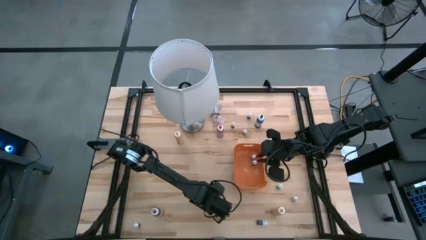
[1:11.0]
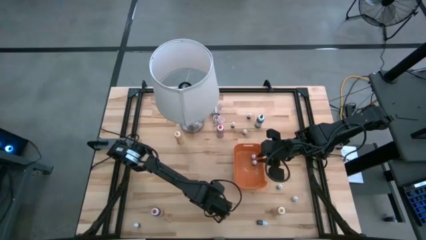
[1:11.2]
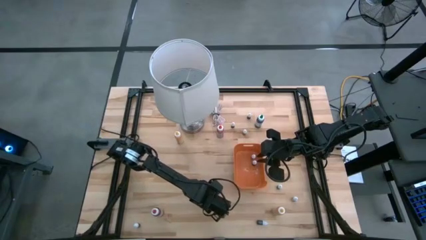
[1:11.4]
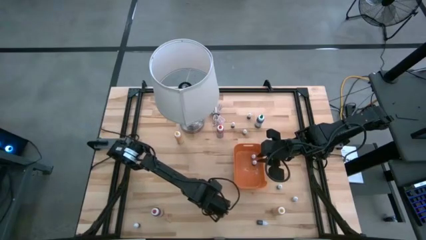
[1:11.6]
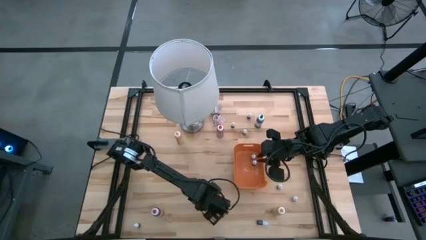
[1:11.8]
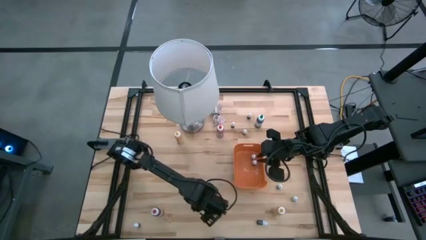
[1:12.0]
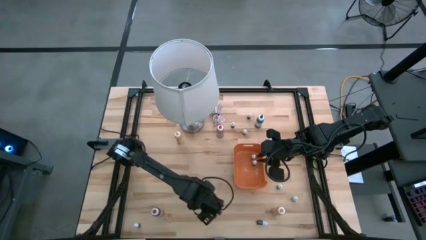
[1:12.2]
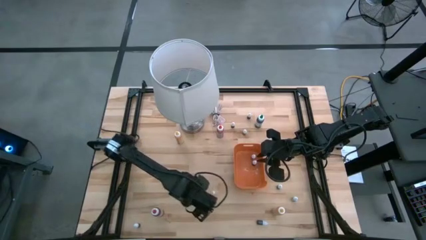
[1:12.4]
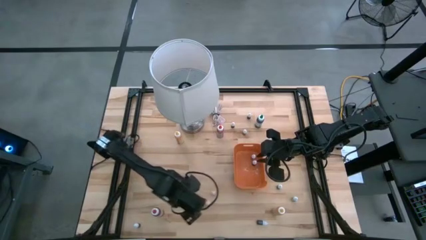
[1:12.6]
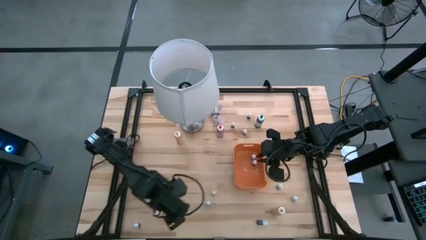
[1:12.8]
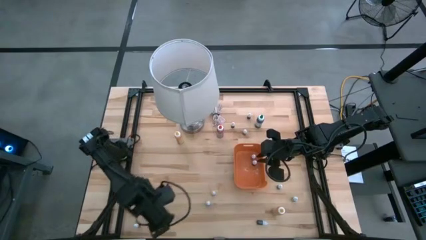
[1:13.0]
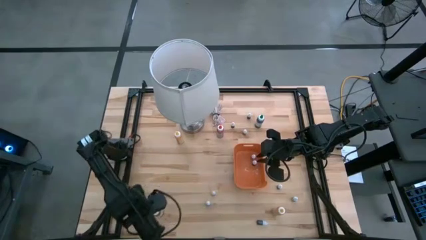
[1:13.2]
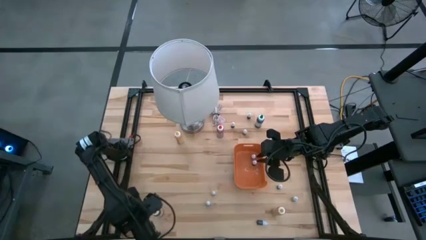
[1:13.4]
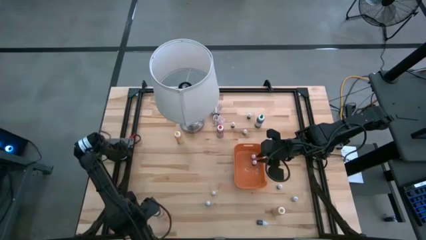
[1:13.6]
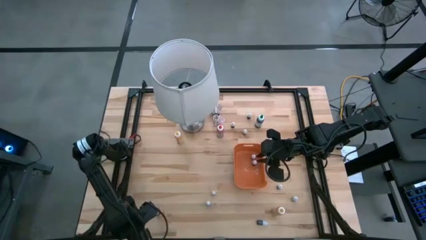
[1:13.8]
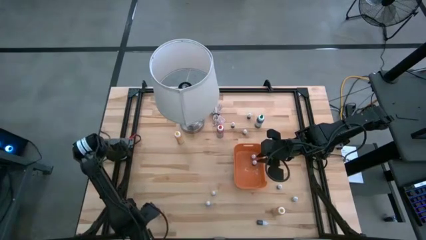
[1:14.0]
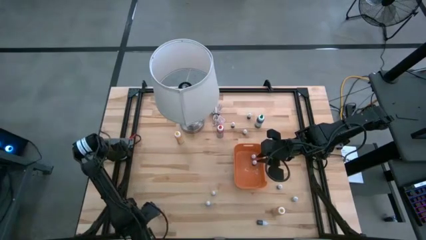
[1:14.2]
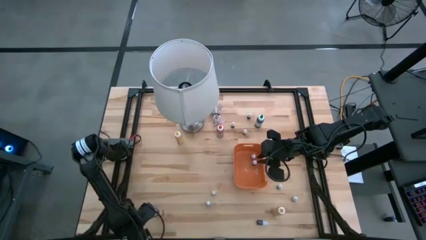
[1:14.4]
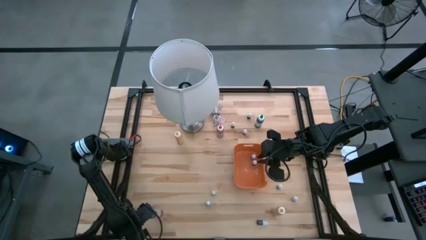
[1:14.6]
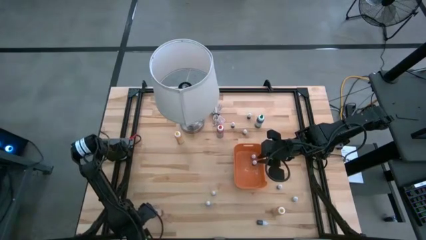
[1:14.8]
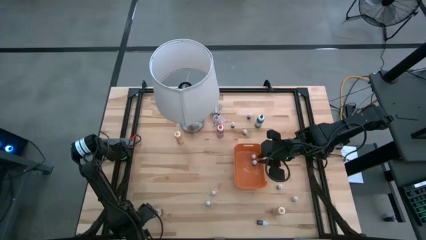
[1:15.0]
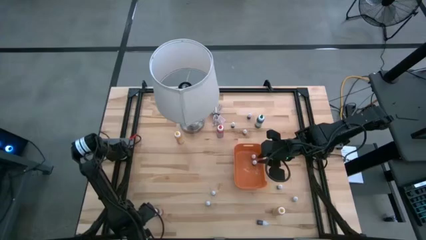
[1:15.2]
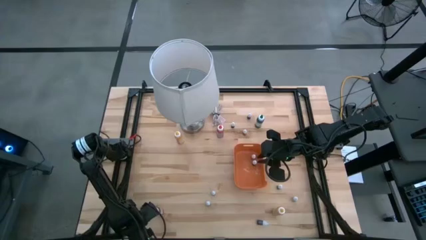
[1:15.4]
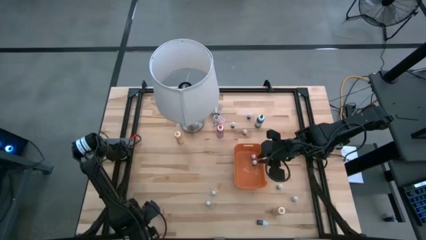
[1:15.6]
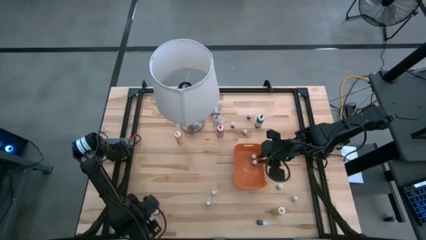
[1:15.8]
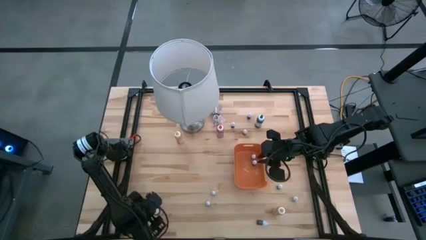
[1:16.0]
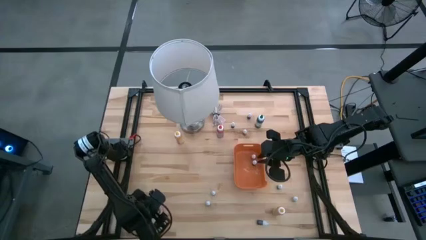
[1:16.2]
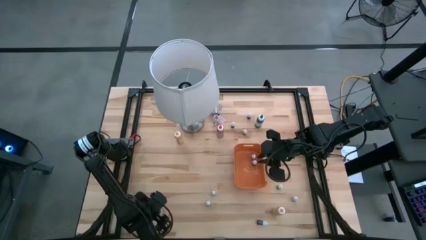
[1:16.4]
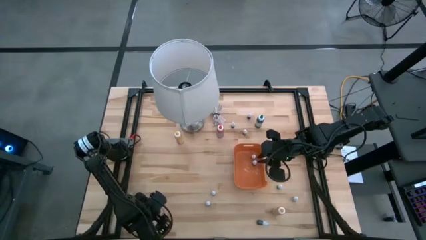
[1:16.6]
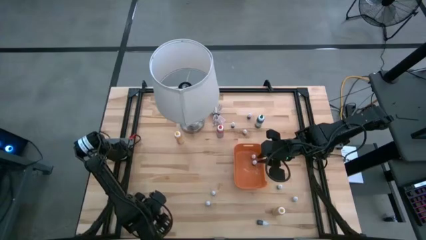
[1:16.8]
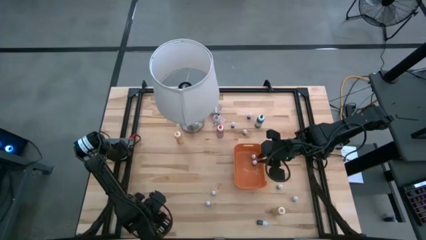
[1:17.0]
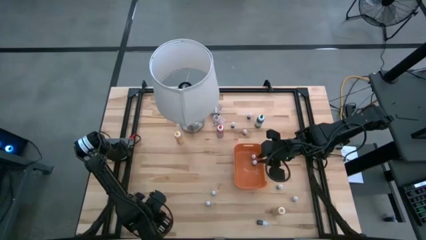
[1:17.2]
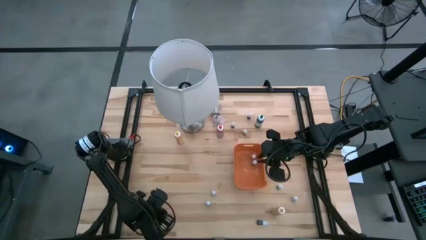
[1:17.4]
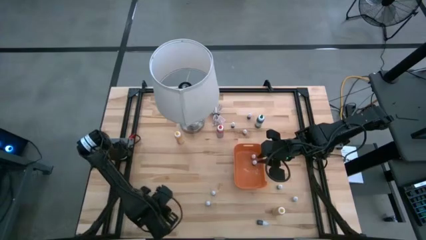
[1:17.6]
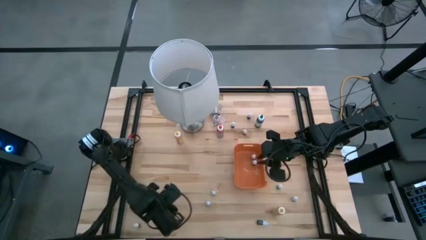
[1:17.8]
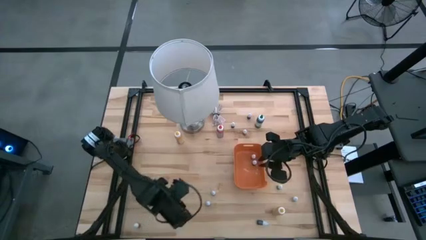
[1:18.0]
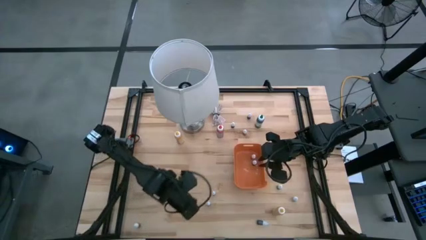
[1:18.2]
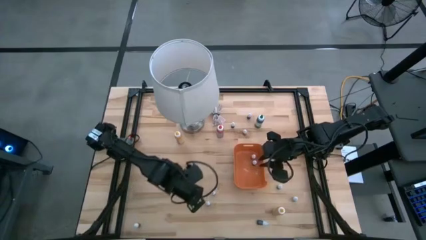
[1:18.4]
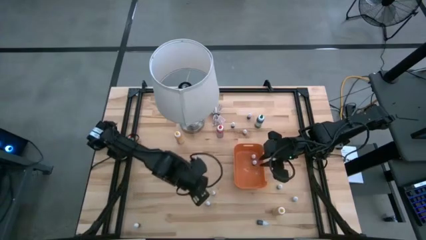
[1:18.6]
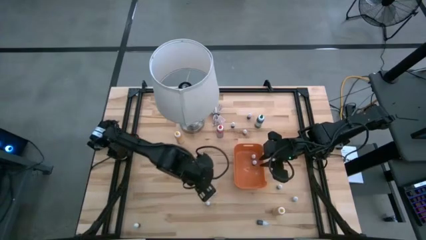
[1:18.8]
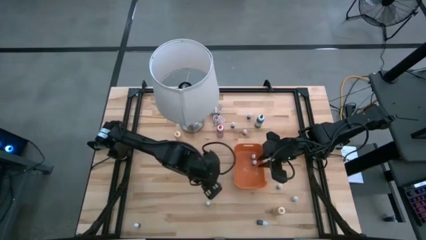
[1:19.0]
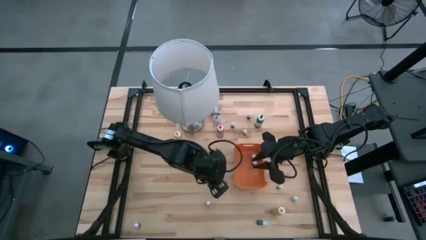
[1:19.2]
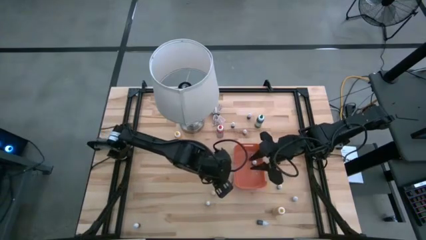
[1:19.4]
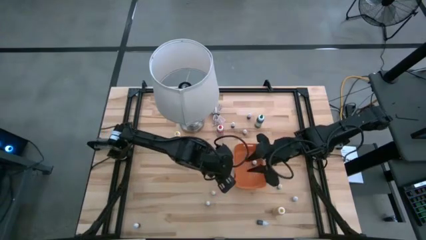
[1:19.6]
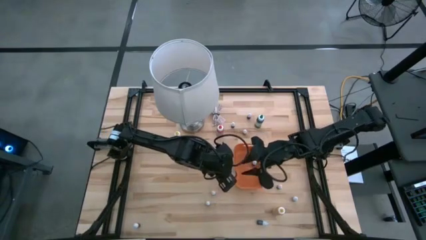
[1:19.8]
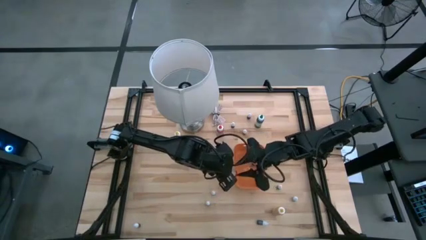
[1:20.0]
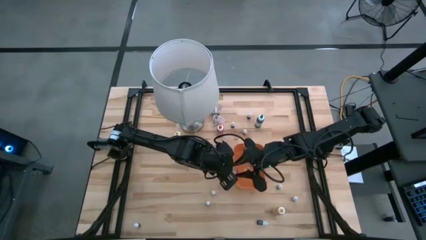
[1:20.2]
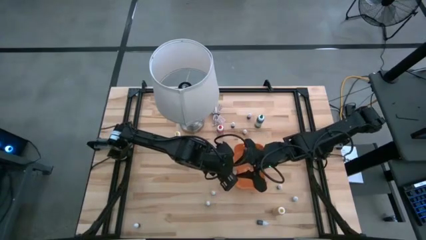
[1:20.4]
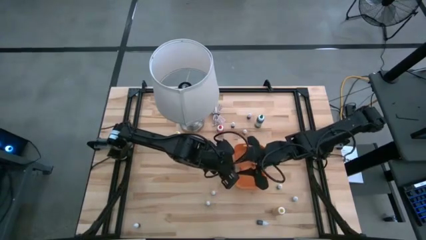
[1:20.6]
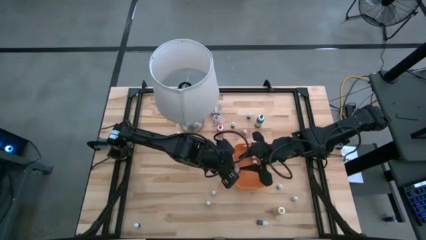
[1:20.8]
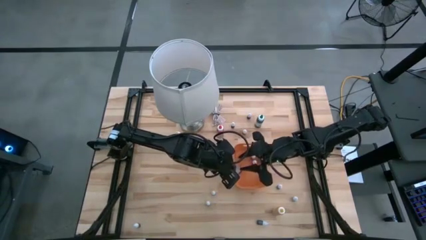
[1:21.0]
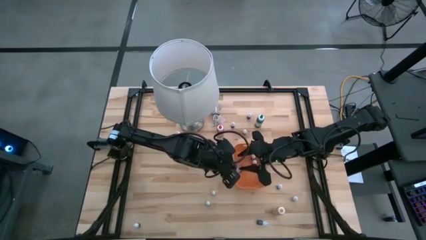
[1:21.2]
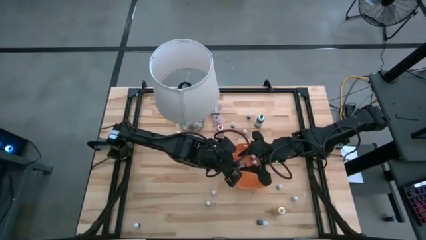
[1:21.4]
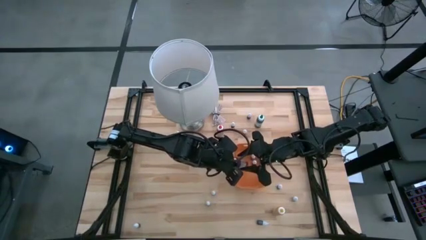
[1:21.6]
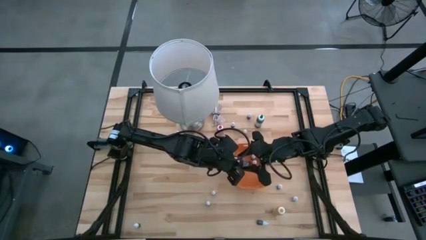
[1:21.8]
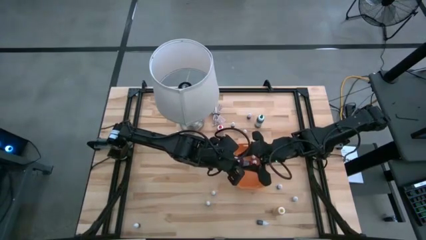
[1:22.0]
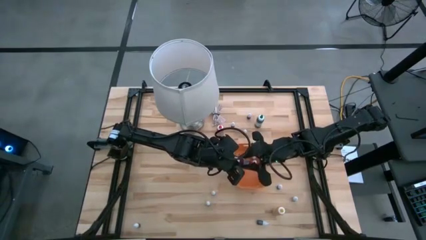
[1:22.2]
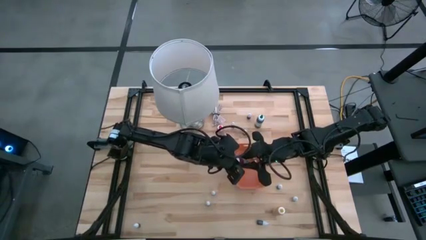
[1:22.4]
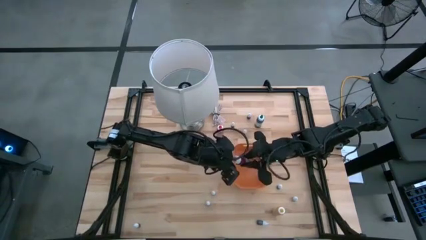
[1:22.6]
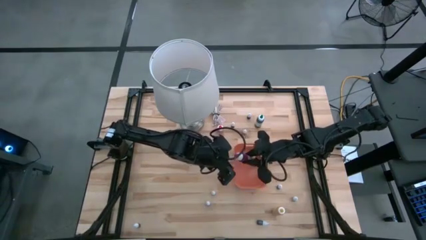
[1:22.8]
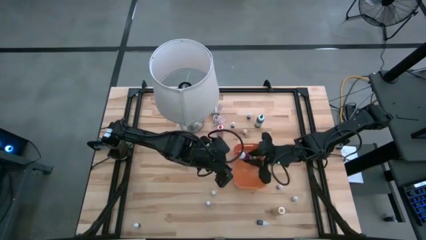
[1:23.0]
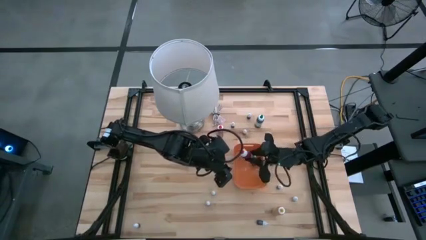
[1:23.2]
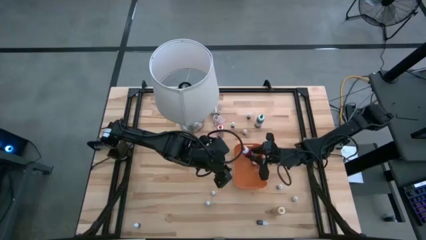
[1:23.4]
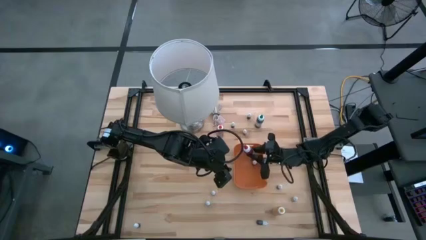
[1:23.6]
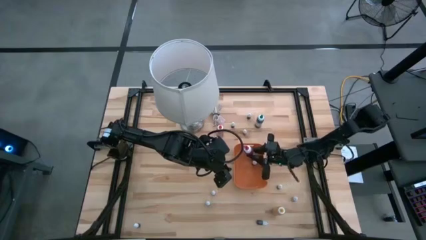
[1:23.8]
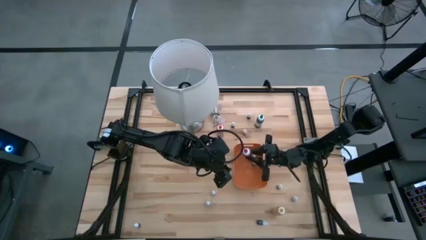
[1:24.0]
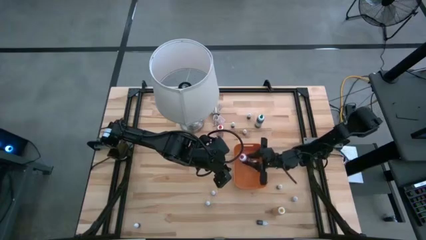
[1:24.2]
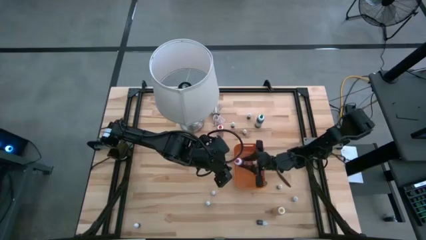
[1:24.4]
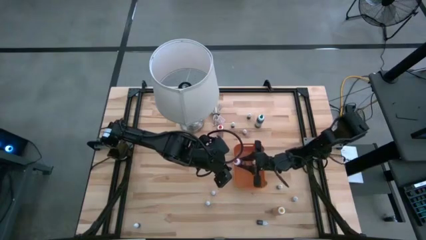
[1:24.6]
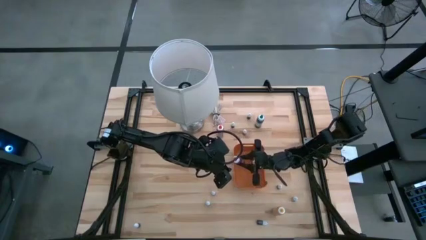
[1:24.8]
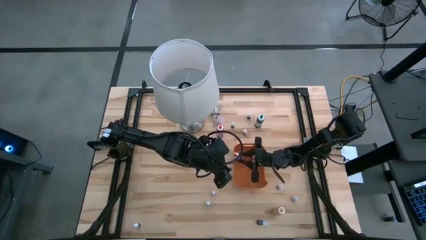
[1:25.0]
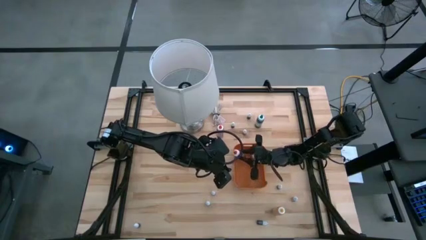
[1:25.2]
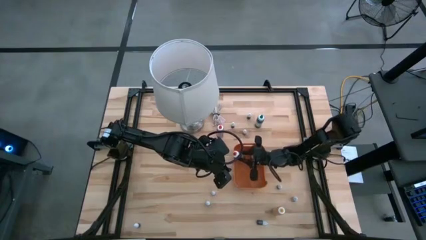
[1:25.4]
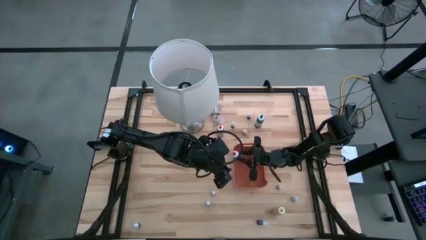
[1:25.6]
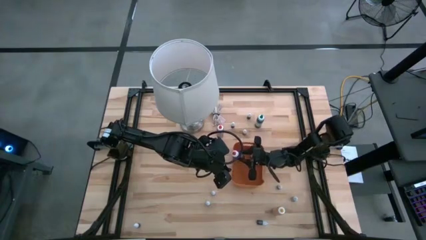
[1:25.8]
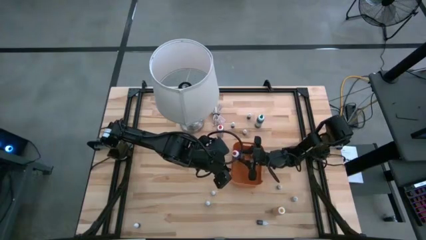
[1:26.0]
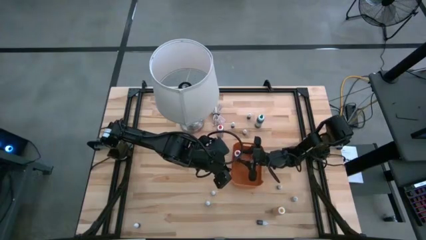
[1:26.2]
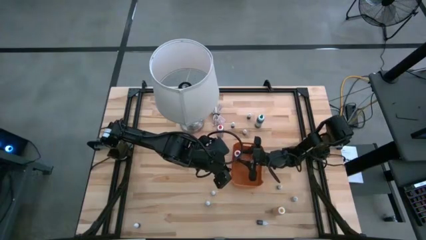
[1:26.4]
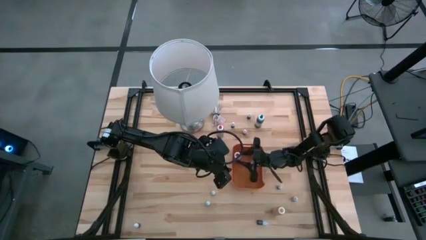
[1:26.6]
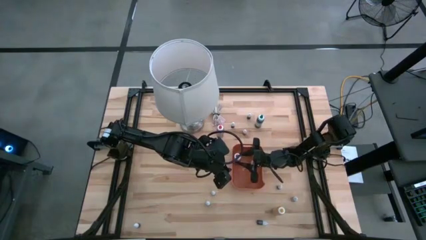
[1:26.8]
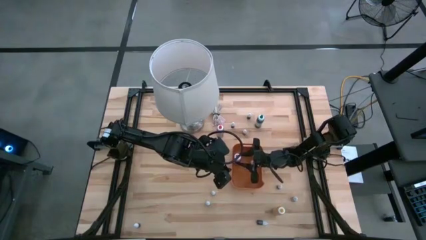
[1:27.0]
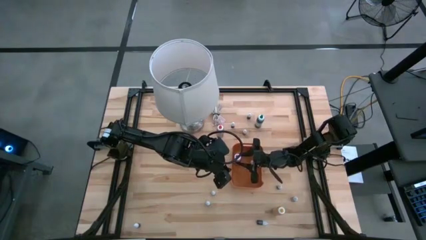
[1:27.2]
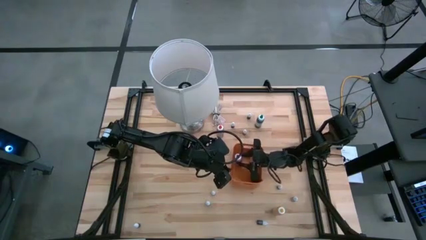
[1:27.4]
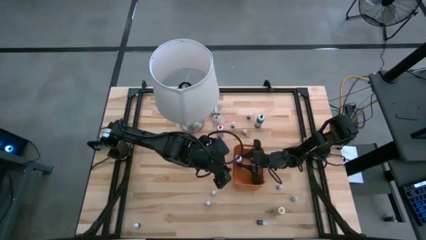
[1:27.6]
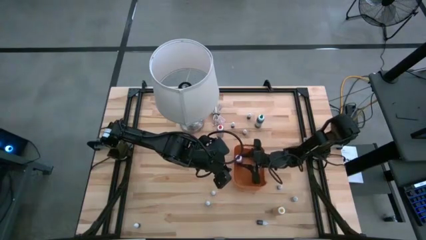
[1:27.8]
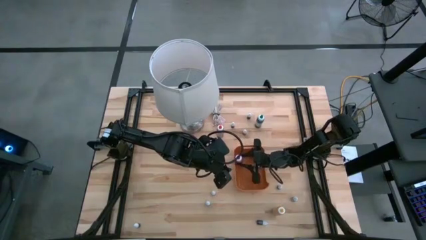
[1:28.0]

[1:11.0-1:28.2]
Task: Pick & Place food coloring
Put the big food coloring bottle into the orange bin
